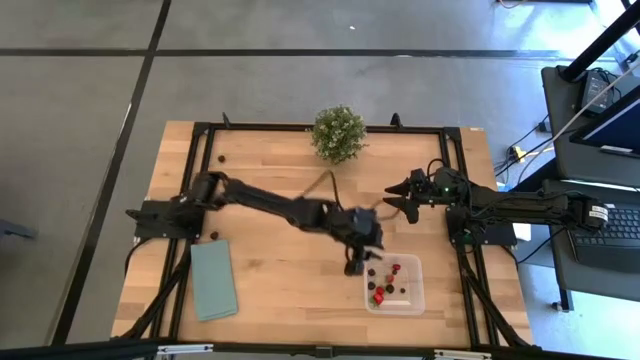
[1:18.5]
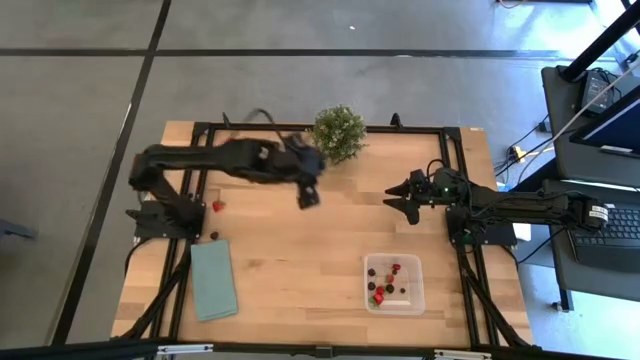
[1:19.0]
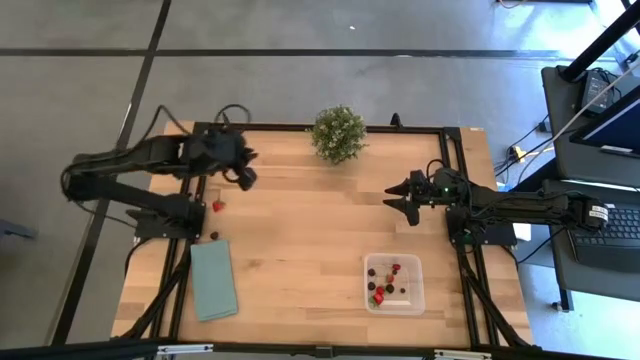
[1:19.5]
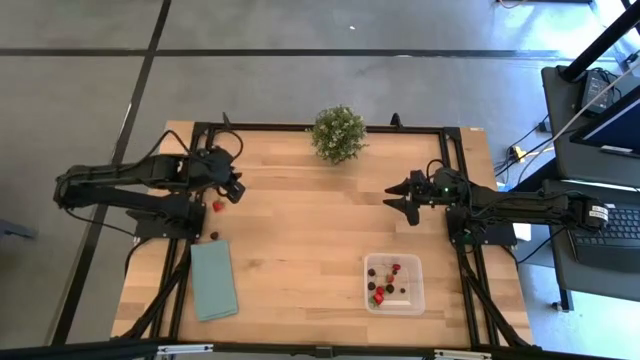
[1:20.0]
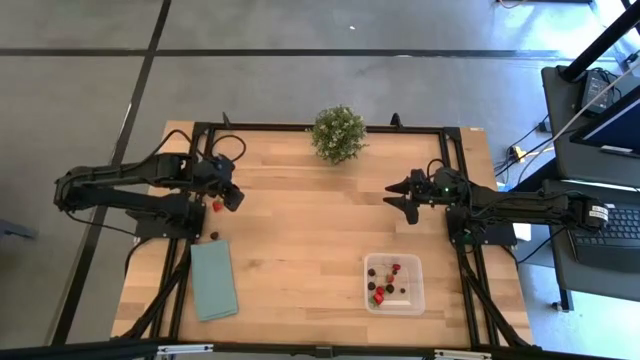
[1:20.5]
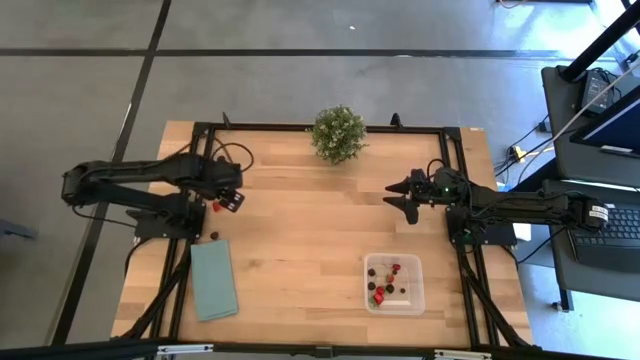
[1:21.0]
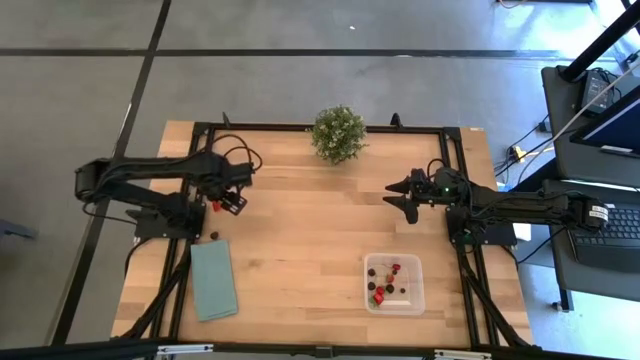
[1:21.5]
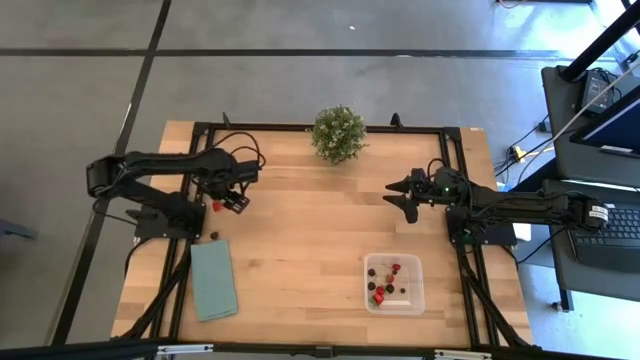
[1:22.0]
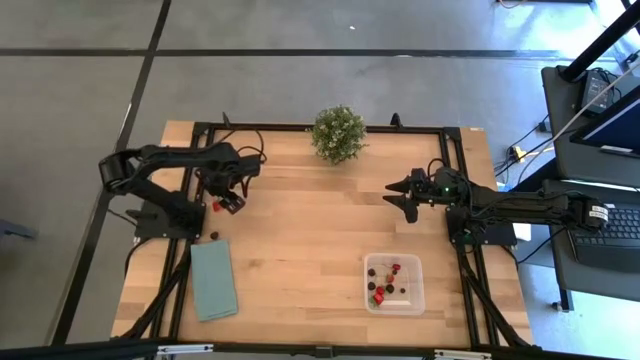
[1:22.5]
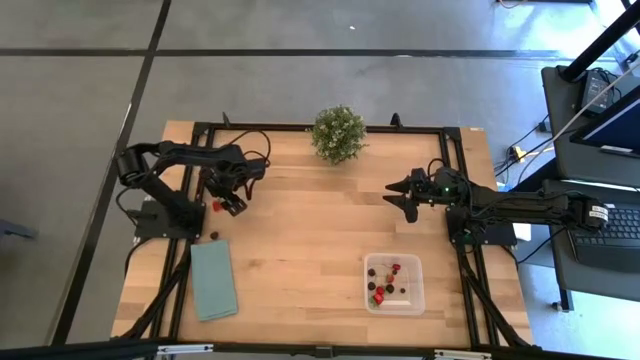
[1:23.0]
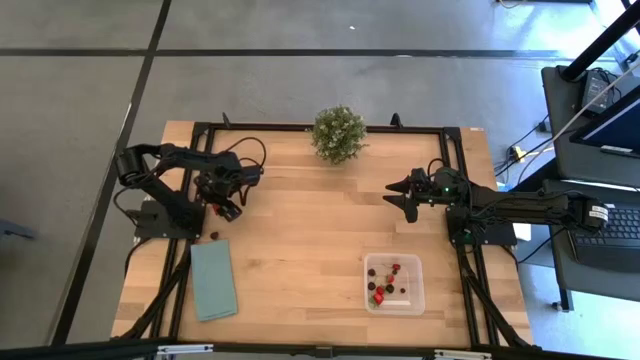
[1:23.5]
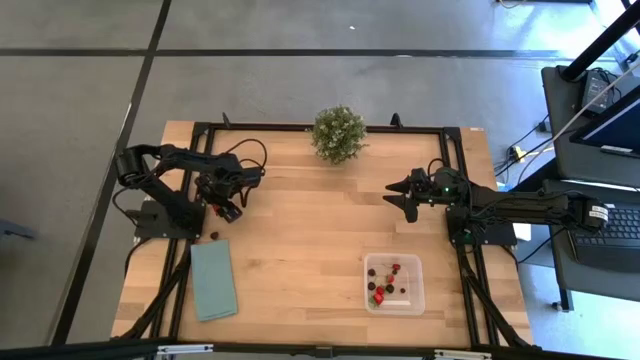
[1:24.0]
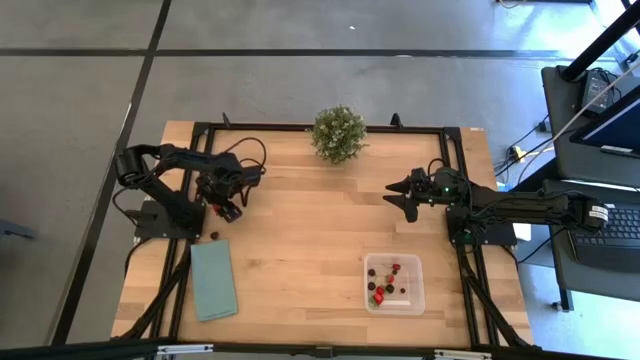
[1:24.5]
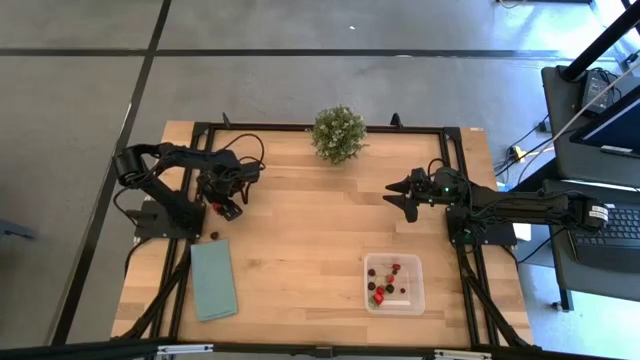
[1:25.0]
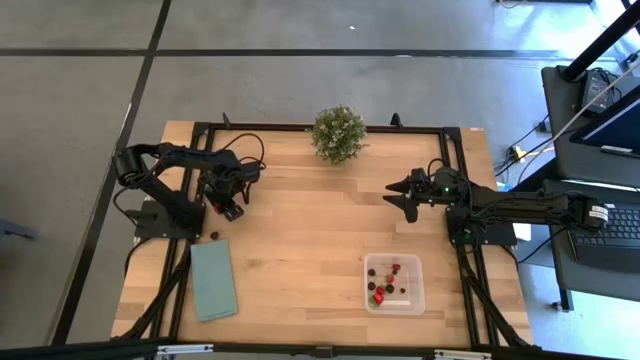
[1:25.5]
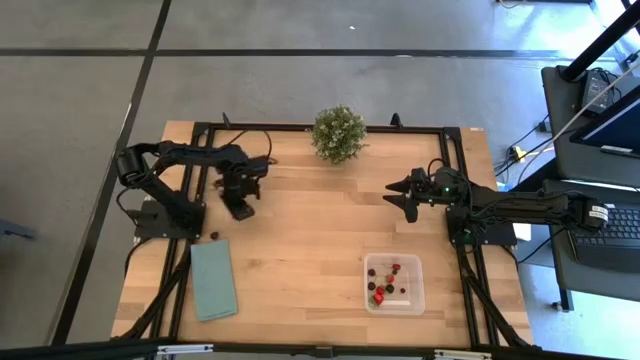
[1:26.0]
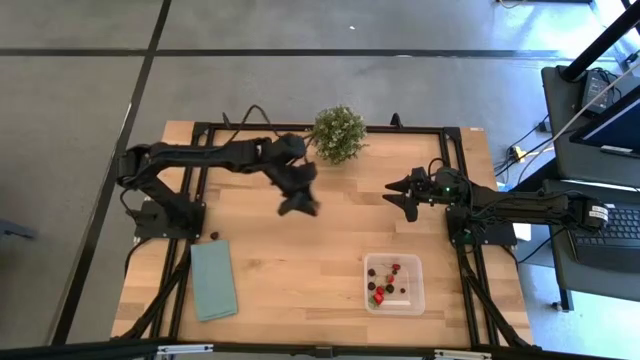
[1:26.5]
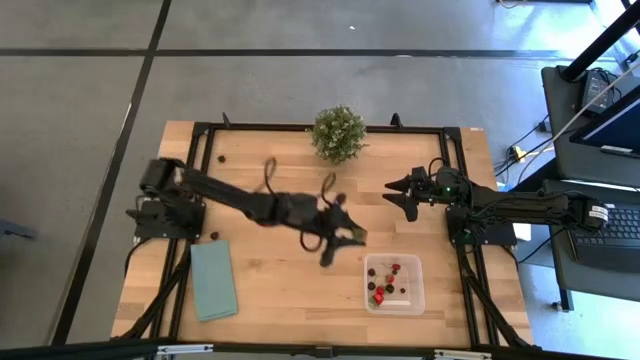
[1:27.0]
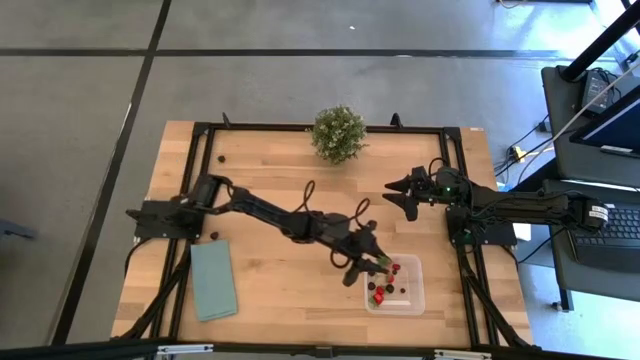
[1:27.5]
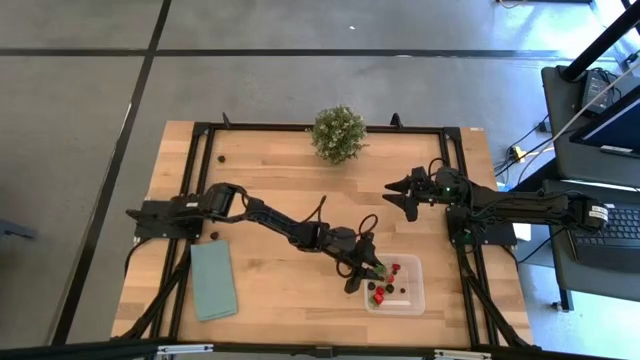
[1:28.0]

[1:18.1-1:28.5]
Task: Pick and placing Produce into tupperware
Put the strawberry into the bin

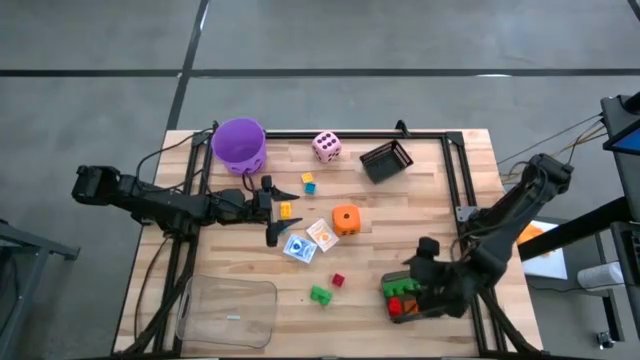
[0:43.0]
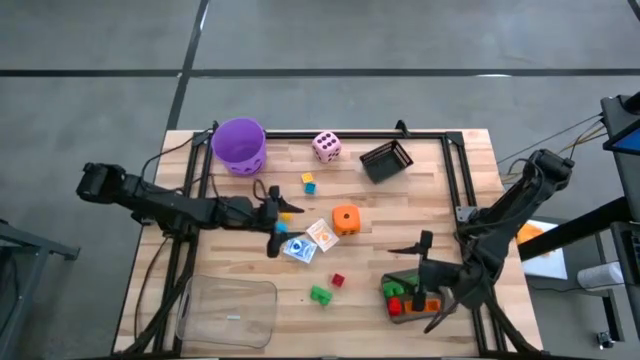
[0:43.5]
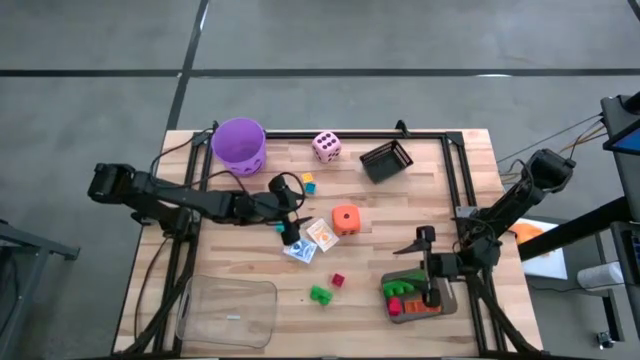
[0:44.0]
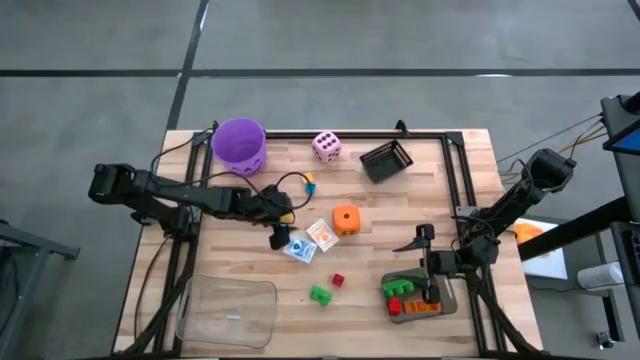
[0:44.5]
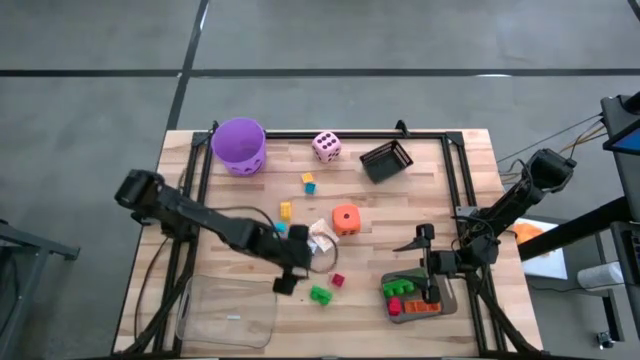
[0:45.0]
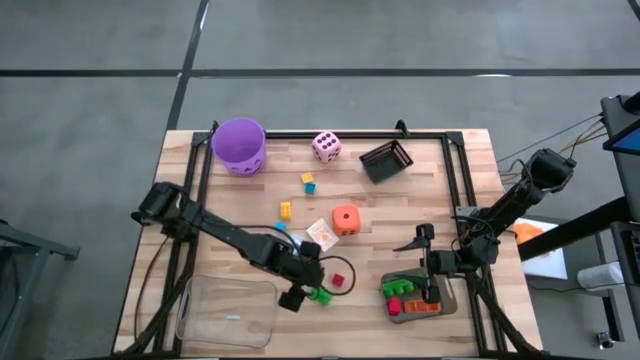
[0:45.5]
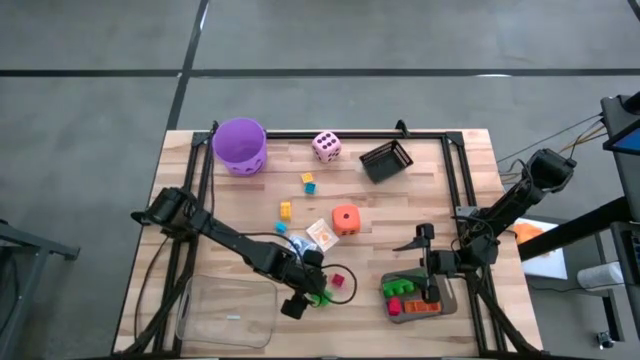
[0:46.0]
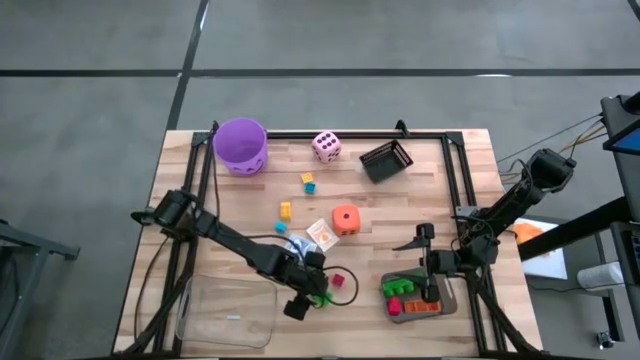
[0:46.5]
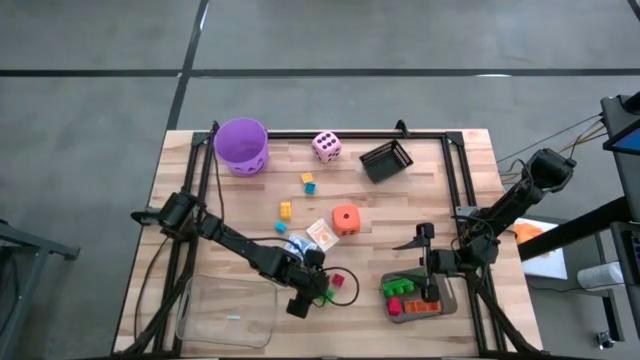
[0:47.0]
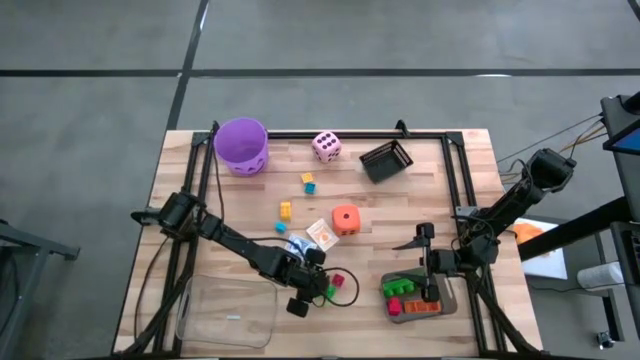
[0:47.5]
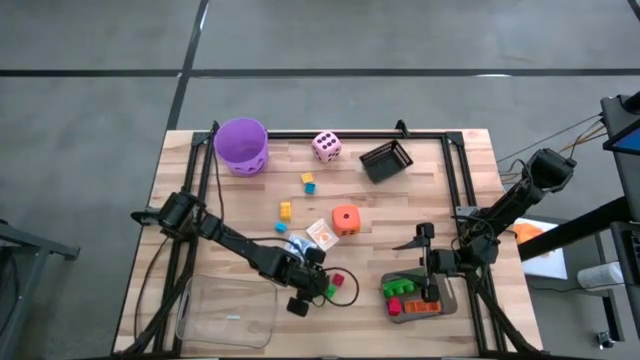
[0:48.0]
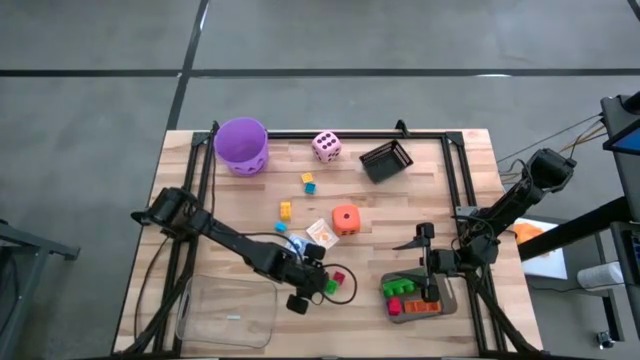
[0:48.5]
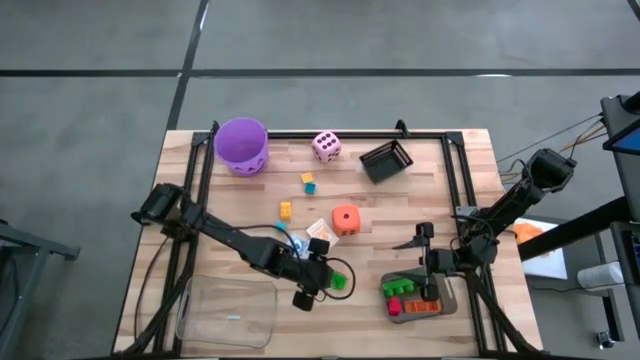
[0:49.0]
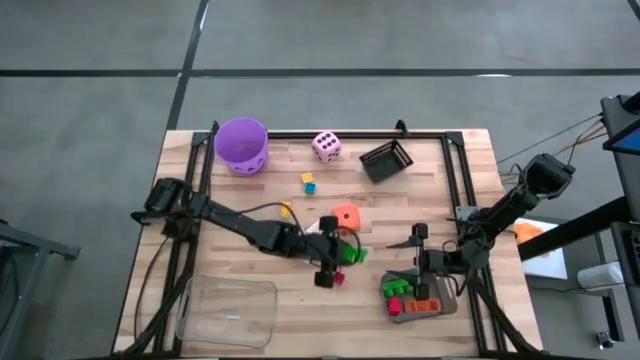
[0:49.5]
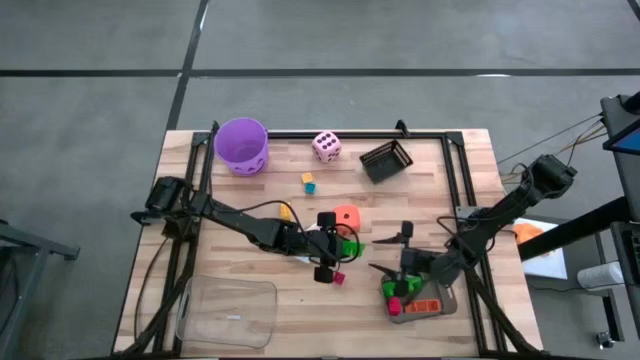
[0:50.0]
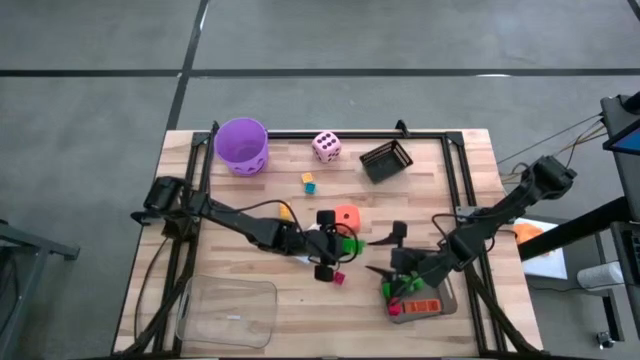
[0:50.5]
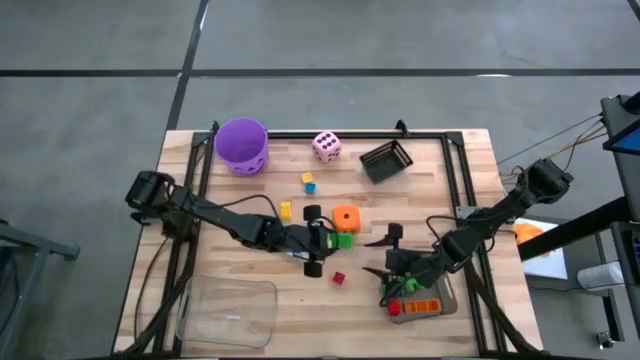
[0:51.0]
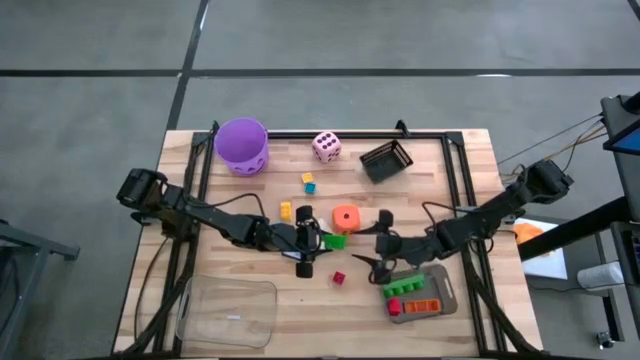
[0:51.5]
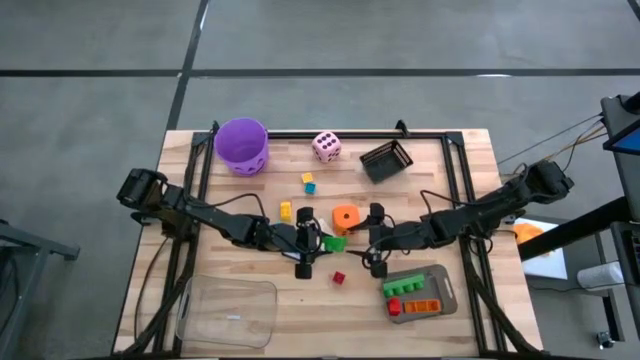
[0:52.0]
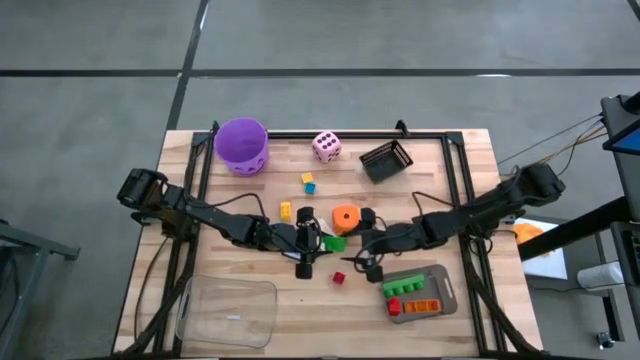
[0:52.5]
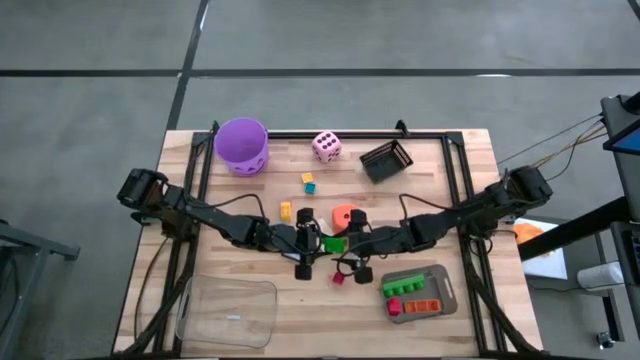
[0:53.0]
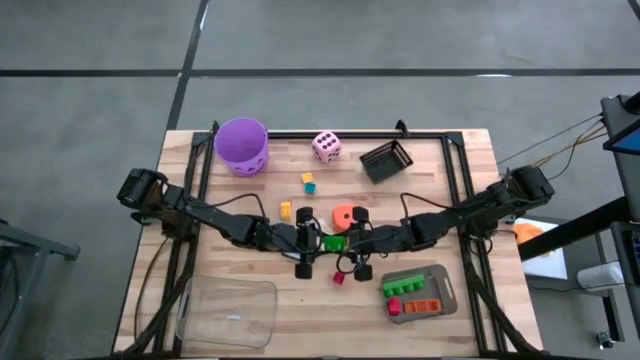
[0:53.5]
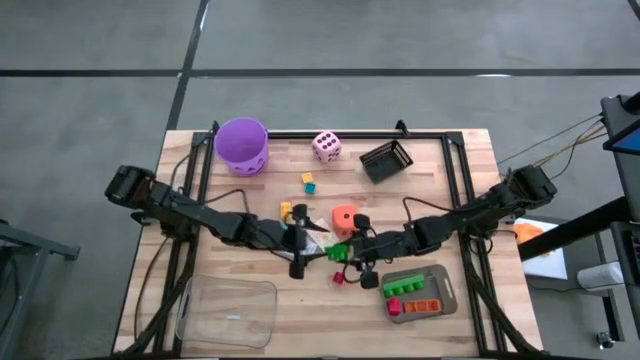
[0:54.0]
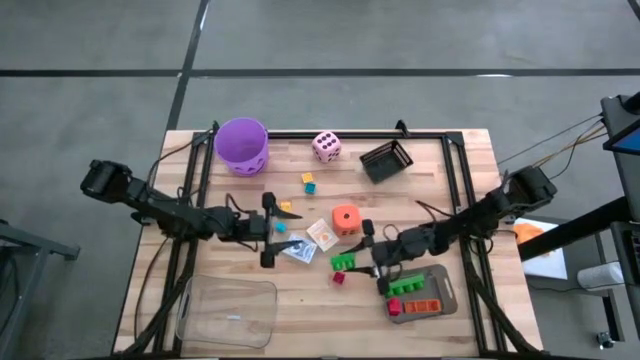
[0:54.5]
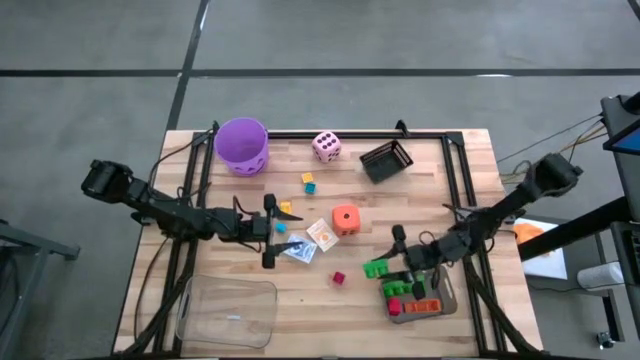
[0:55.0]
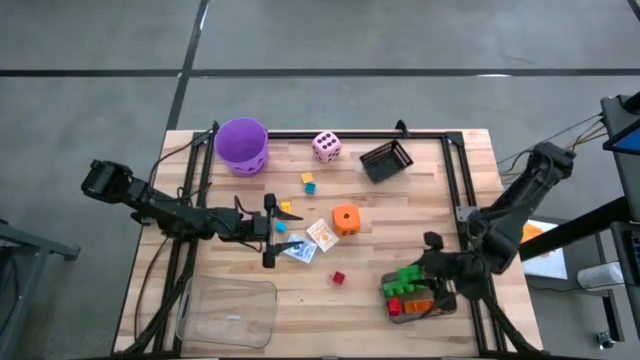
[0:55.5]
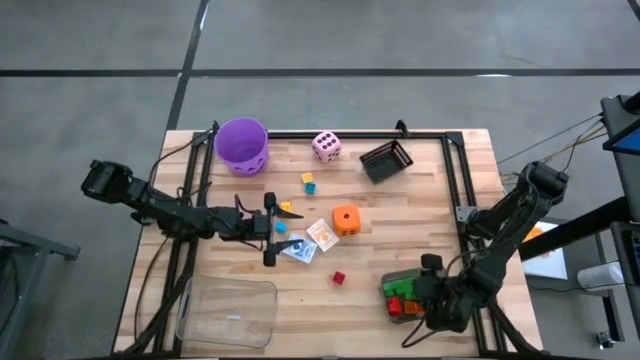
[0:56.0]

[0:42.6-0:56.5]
Task: Pick & Place Toys
Put the green game piece into the black bin
